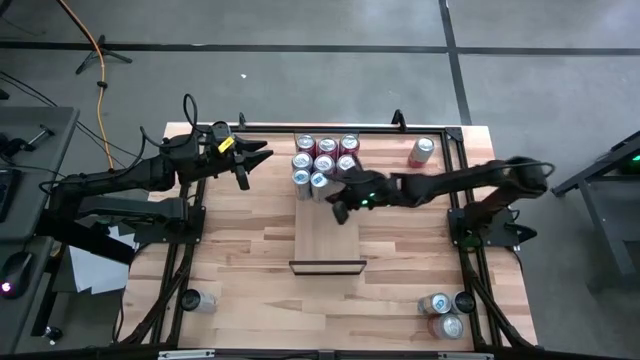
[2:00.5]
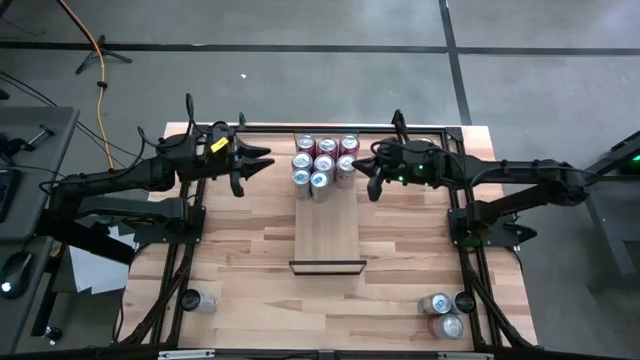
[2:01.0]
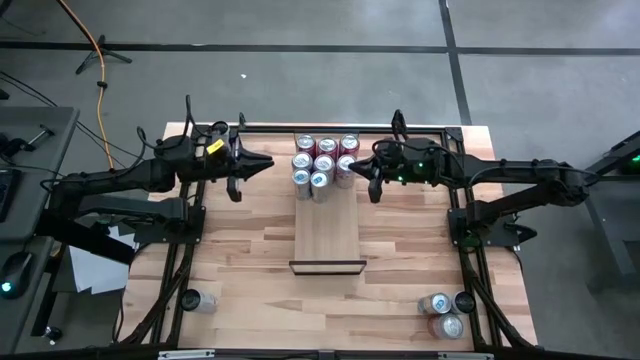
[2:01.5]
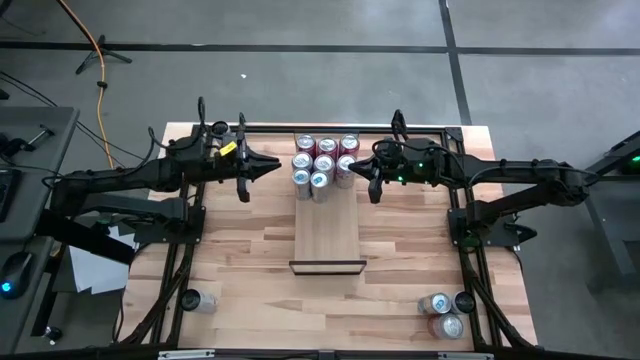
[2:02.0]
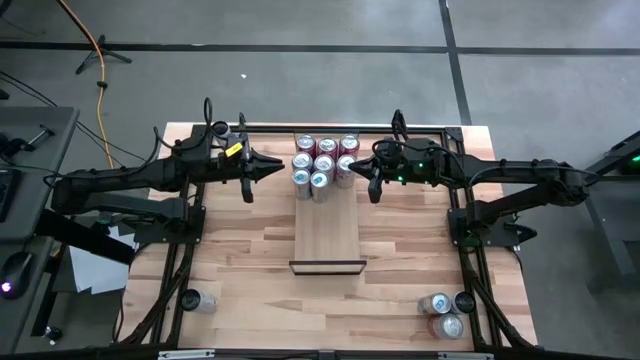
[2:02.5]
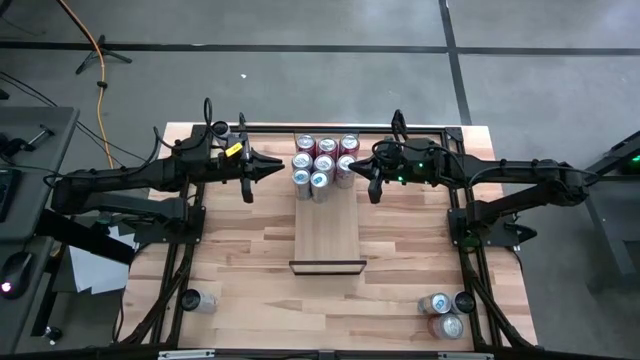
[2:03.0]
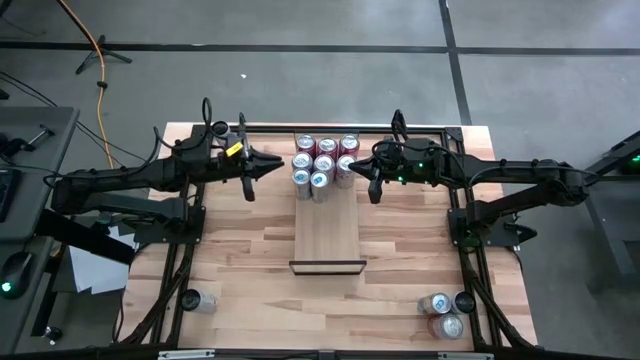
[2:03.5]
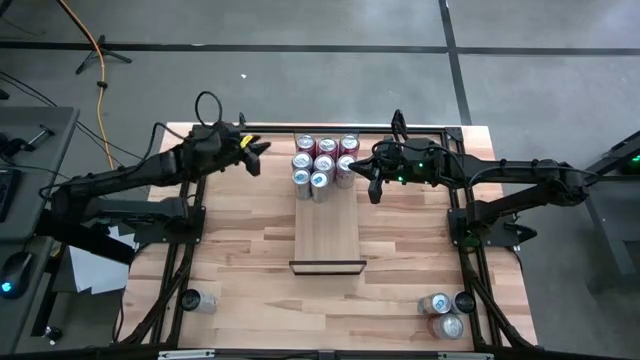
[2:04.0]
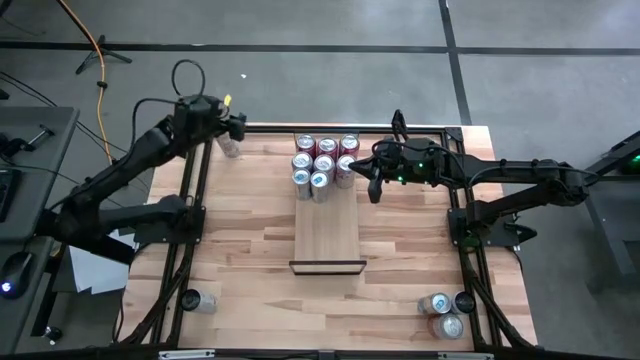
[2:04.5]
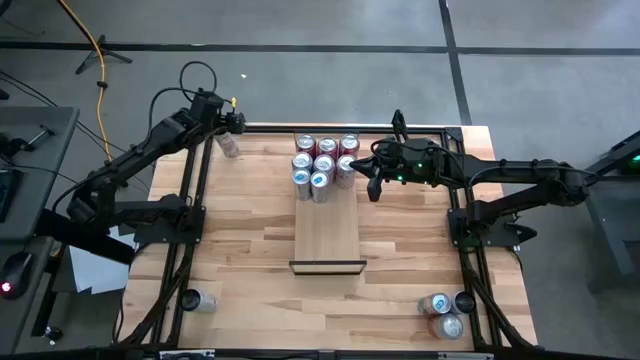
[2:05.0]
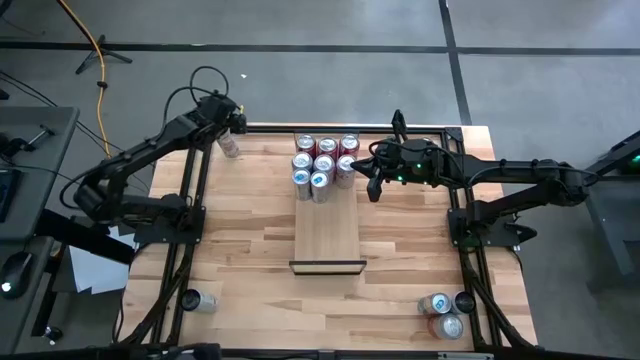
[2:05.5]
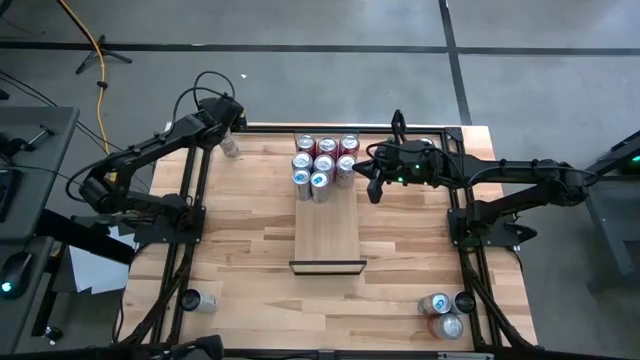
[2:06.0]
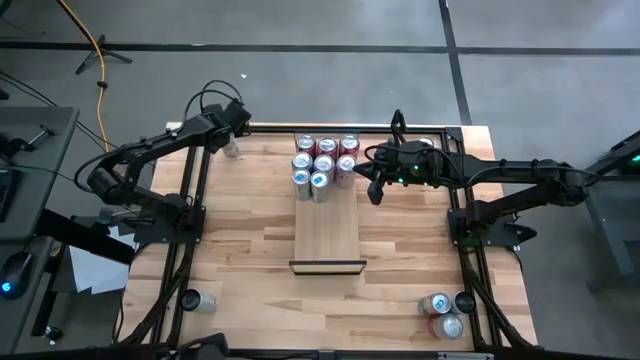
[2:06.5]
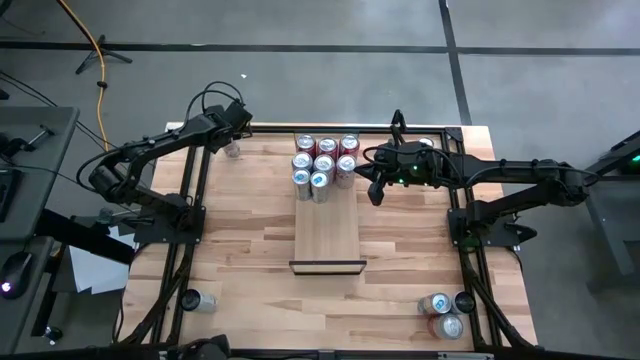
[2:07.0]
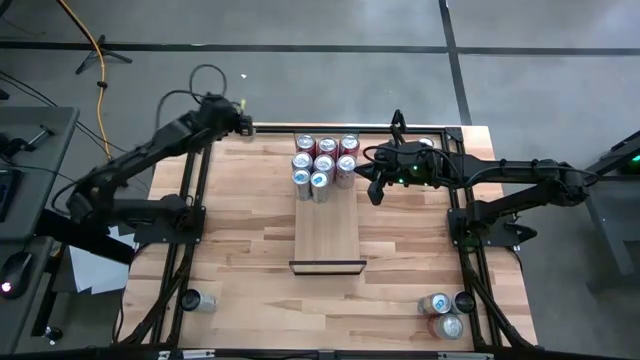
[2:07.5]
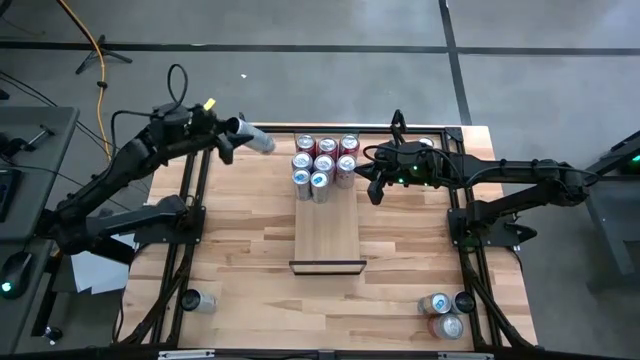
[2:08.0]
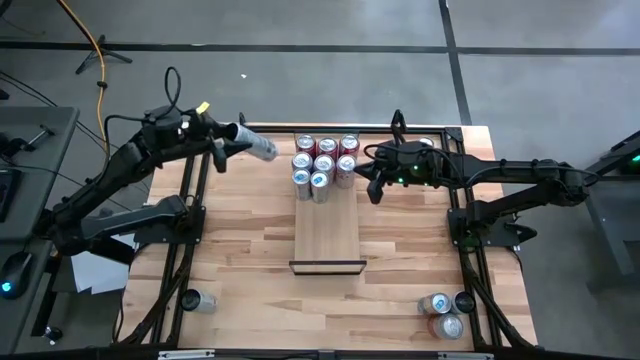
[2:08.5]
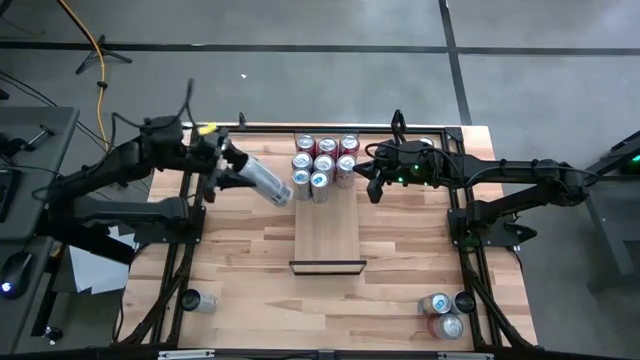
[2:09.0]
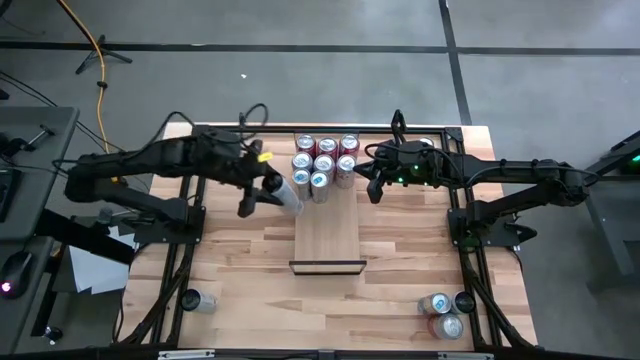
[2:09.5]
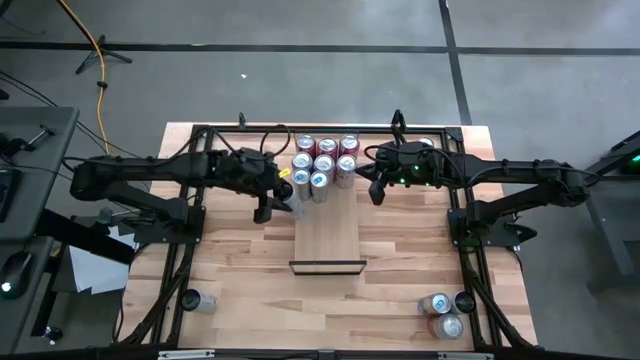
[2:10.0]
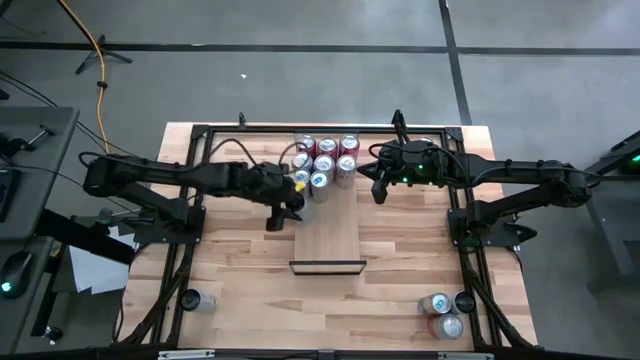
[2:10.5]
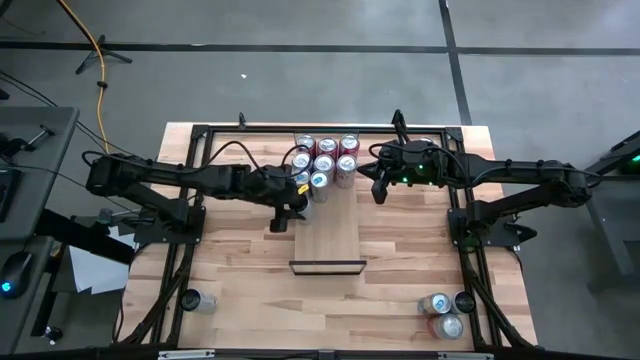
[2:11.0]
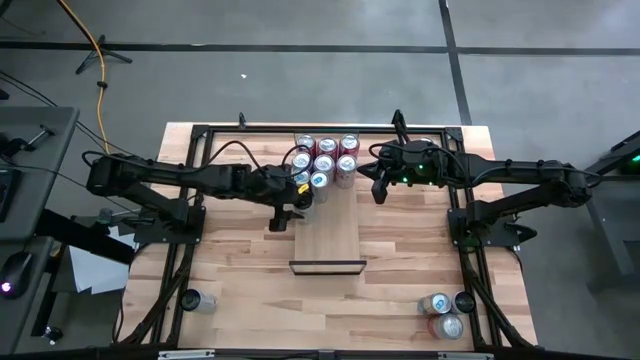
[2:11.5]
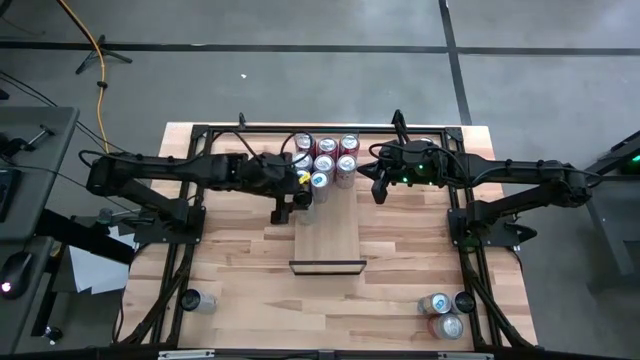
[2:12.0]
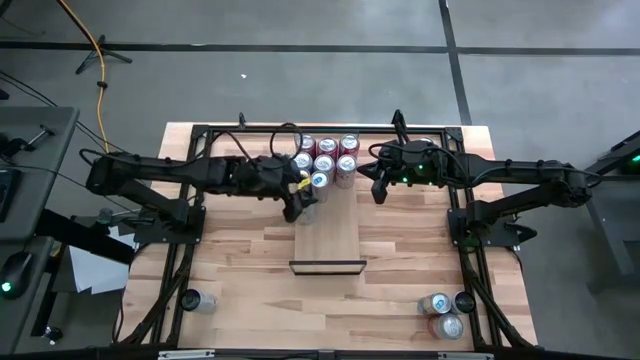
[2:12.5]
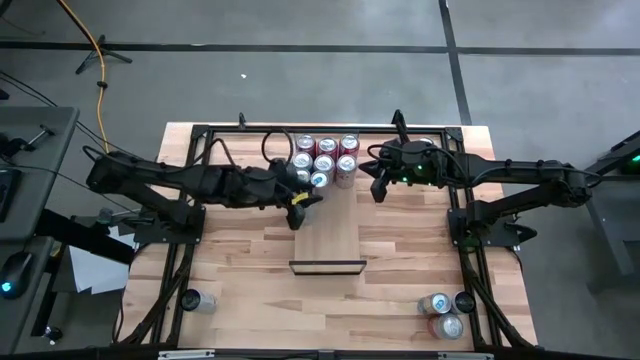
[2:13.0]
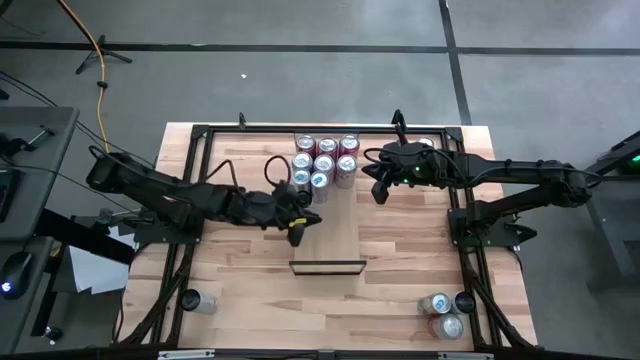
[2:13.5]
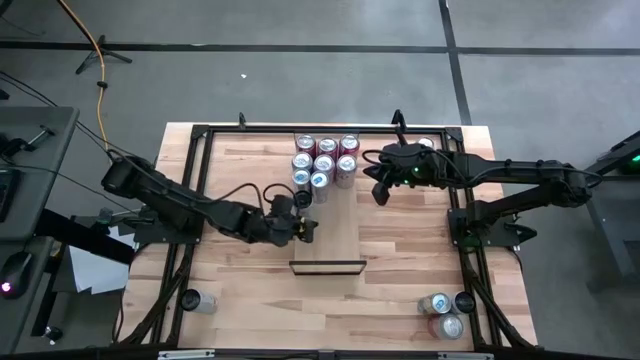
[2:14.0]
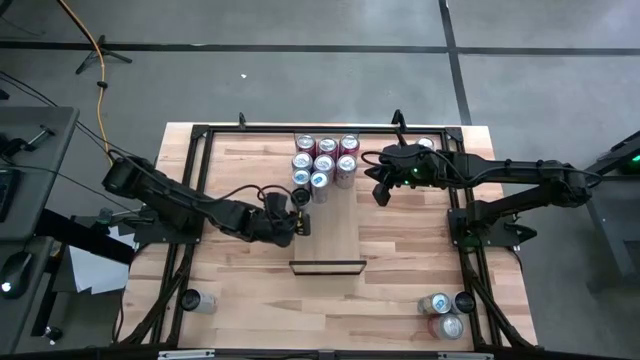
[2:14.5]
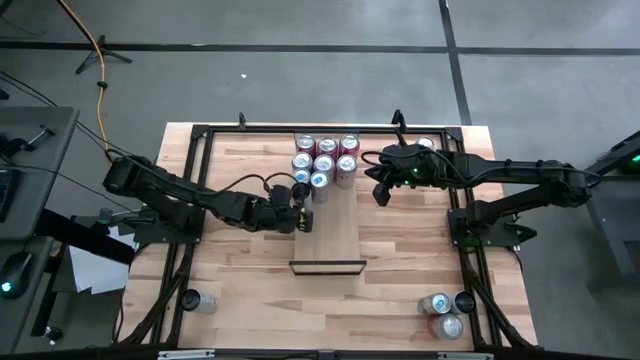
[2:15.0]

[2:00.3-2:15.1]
Task: Place canned beverage on shelf
Put the top left white pink soda can on the shelf

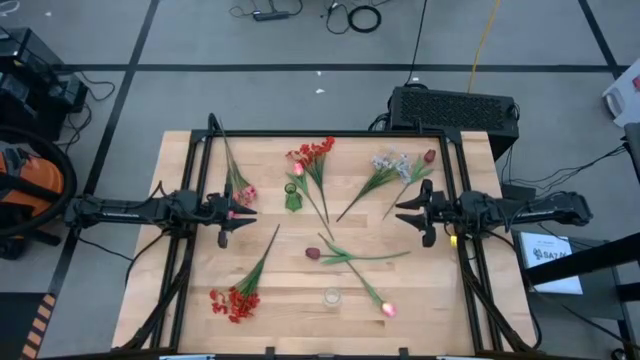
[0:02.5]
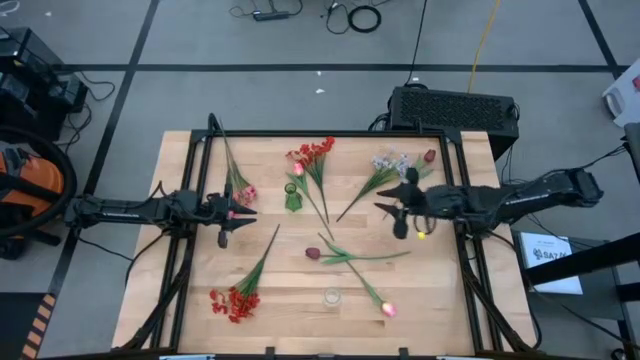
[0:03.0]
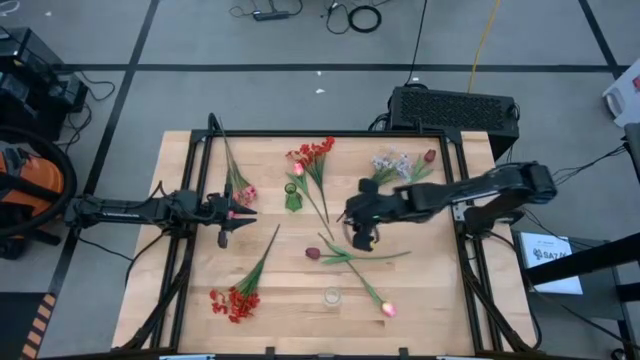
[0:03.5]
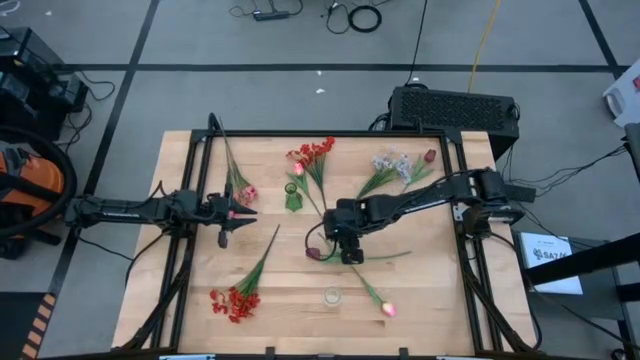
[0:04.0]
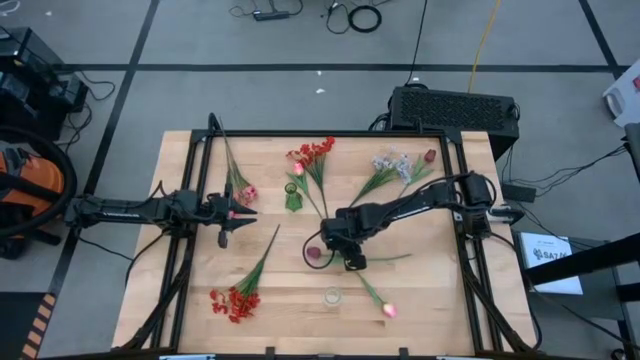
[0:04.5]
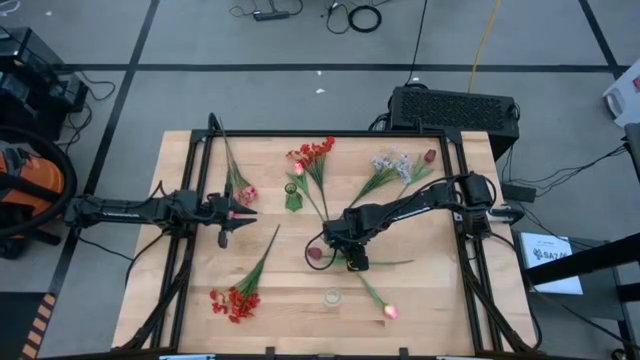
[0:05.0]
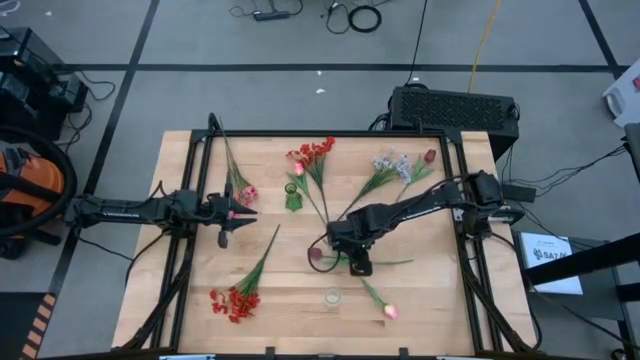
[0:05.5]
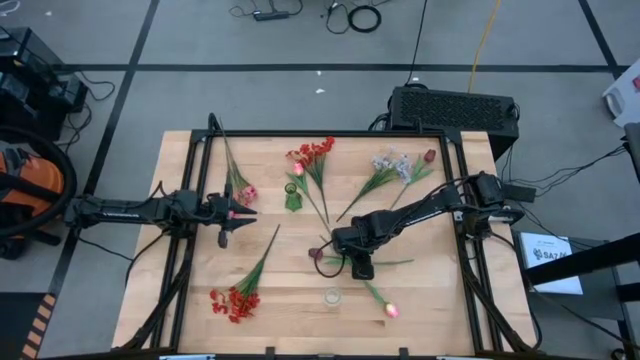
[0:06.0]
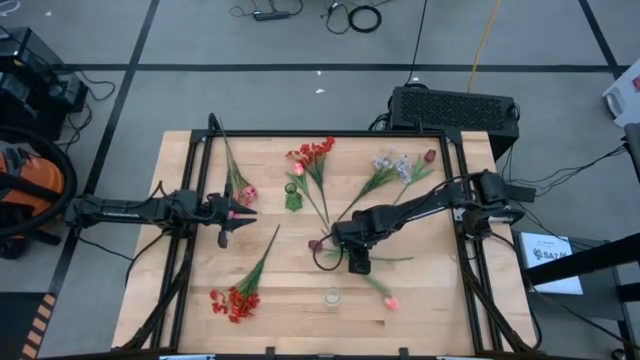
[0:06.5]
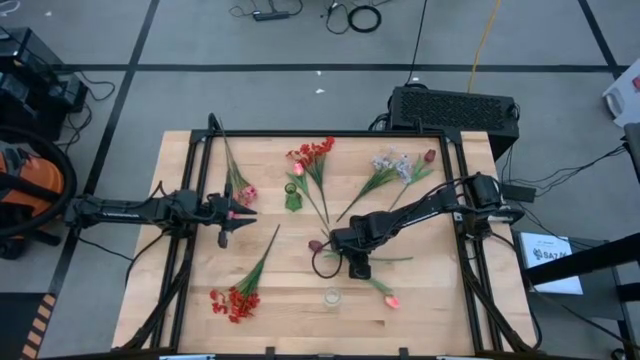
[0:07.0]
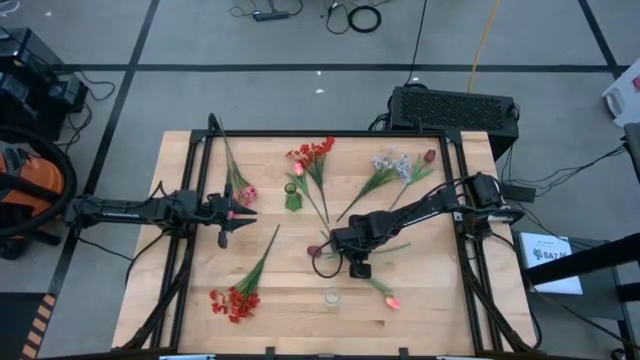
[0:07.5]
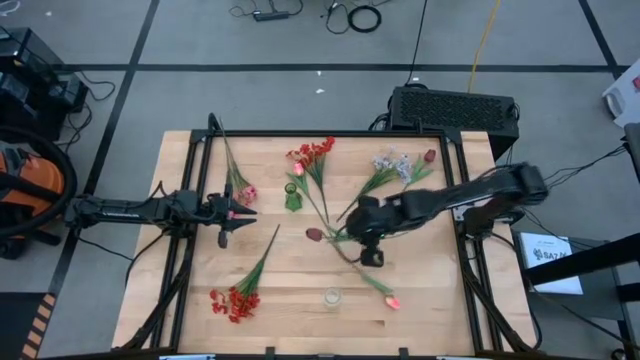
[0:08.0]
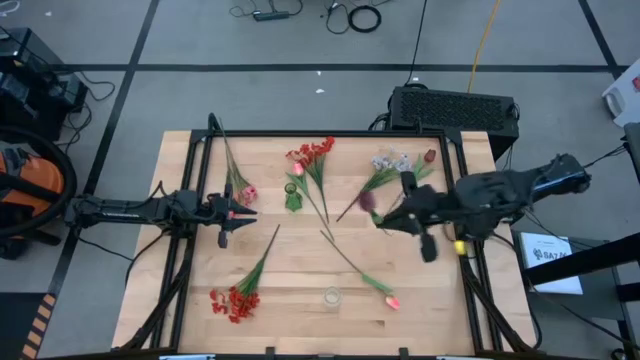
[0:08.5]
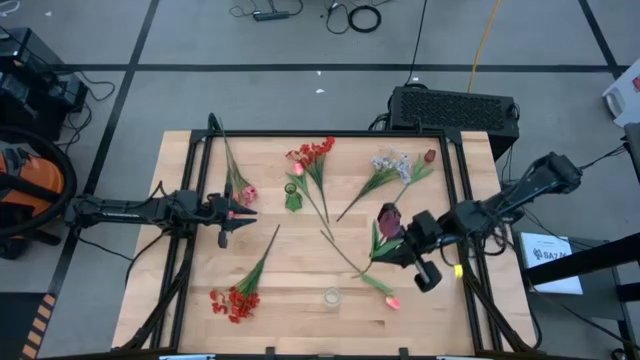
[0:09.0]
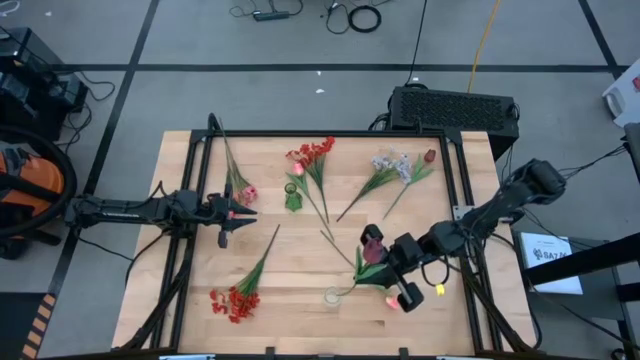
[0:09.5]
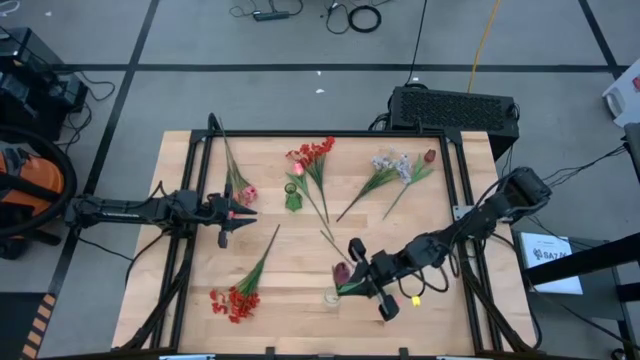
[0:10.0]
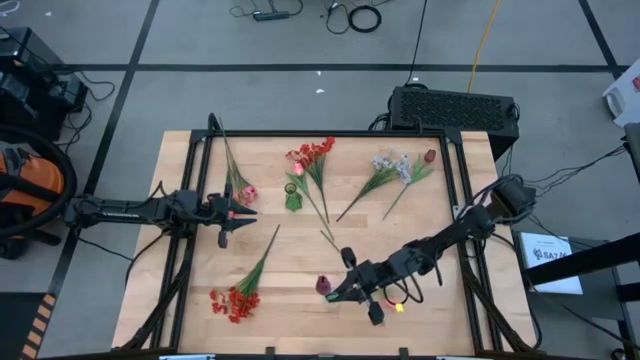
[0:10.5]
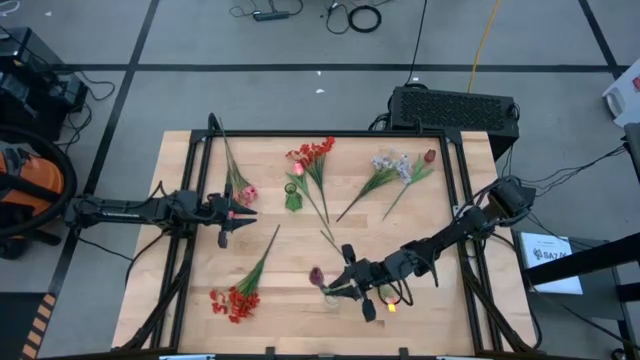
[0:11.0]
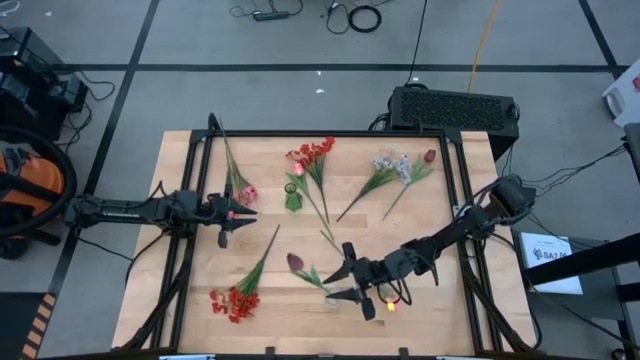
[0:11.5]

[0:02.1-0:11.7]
Task: Sort flowers into vase by color
Put the bottom red tulip into the transparent vase
